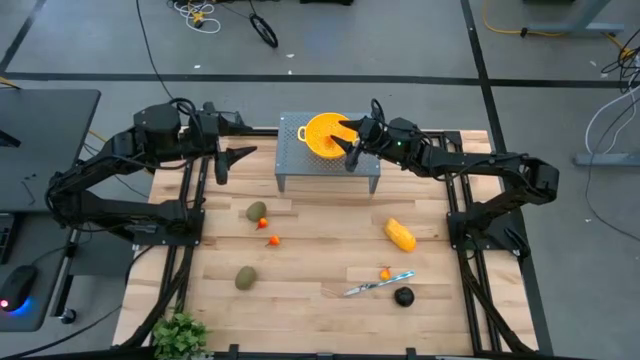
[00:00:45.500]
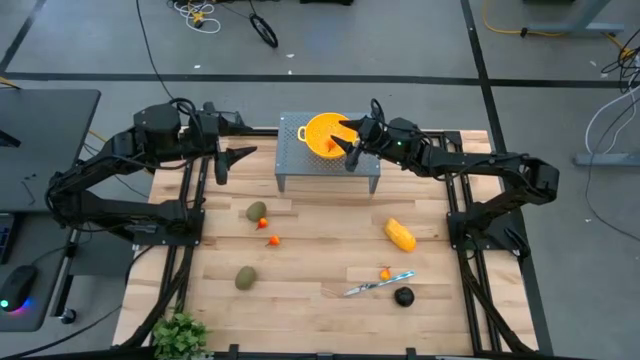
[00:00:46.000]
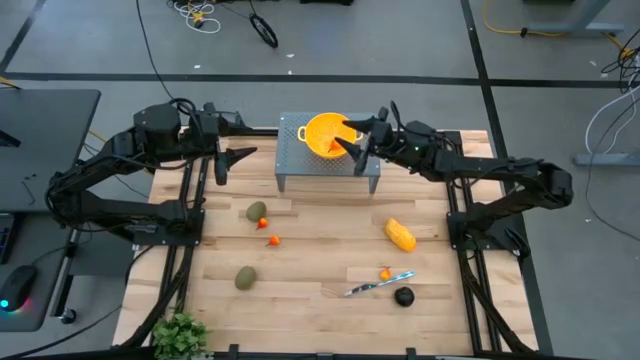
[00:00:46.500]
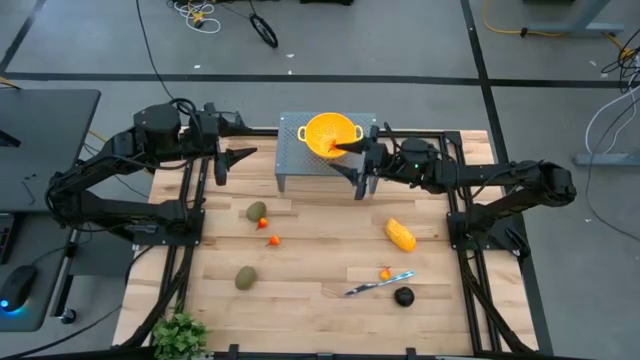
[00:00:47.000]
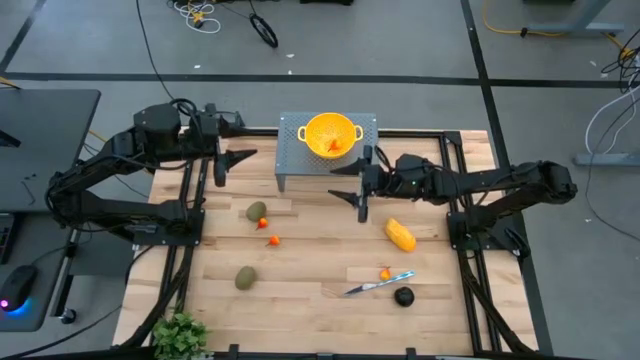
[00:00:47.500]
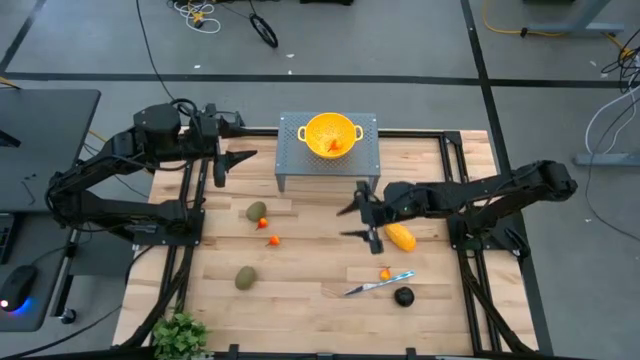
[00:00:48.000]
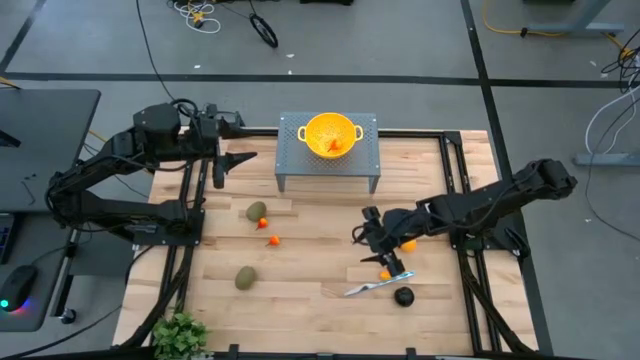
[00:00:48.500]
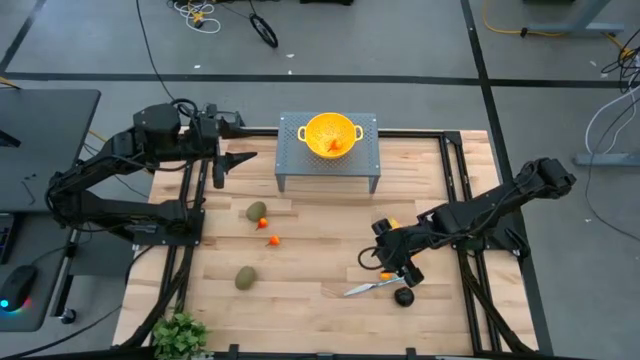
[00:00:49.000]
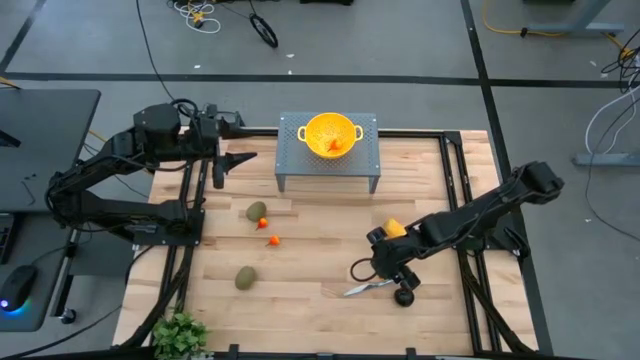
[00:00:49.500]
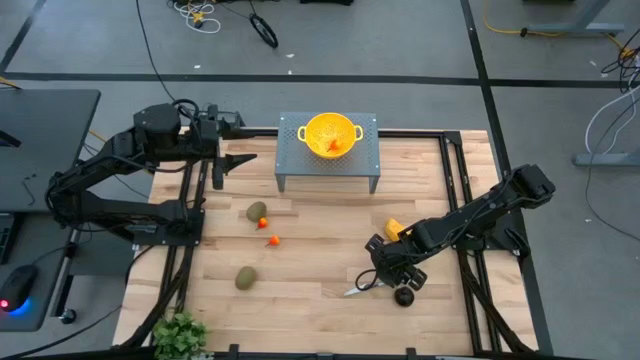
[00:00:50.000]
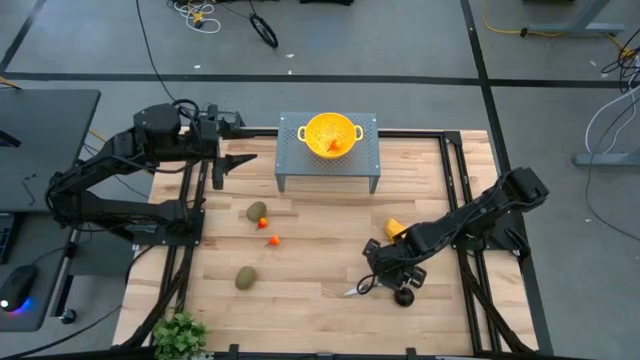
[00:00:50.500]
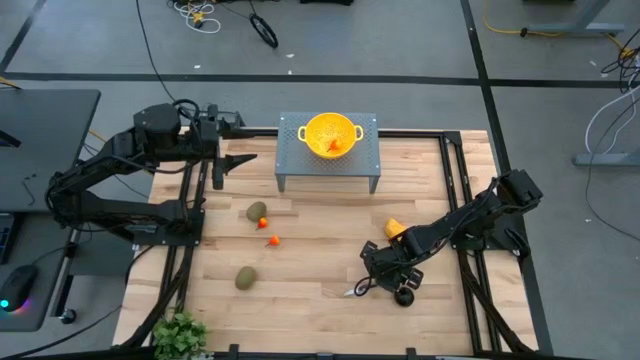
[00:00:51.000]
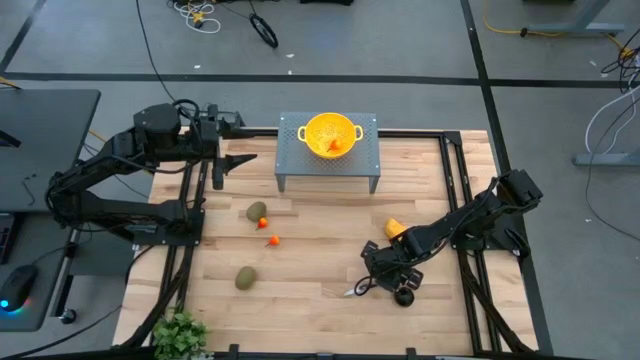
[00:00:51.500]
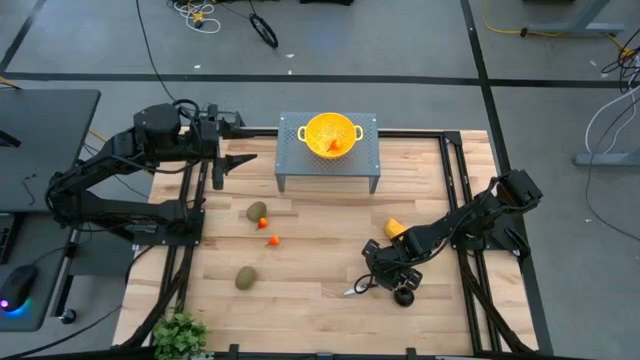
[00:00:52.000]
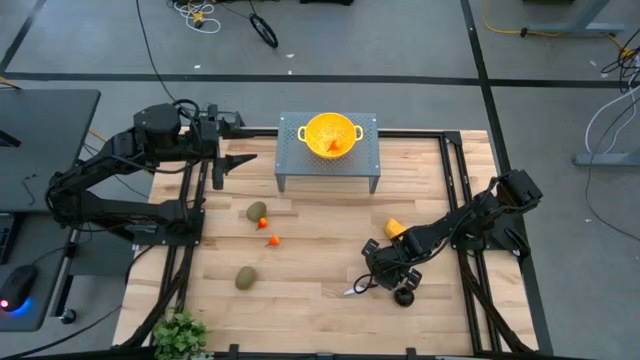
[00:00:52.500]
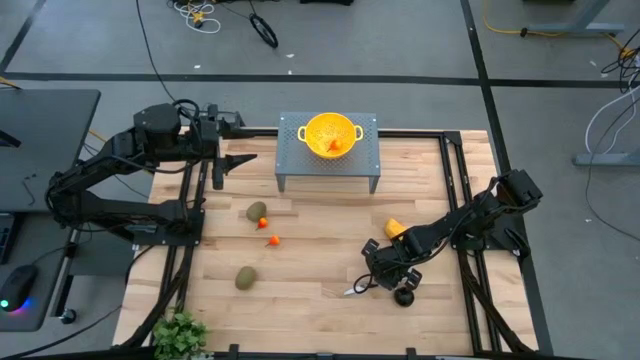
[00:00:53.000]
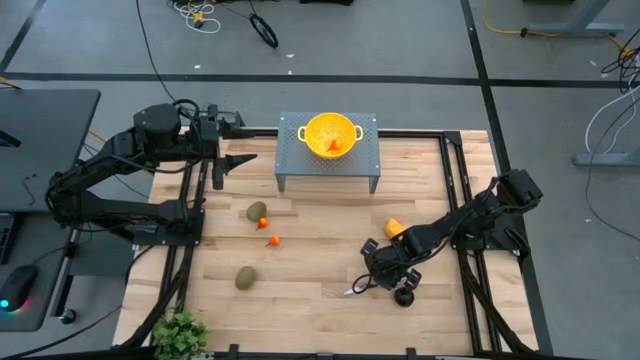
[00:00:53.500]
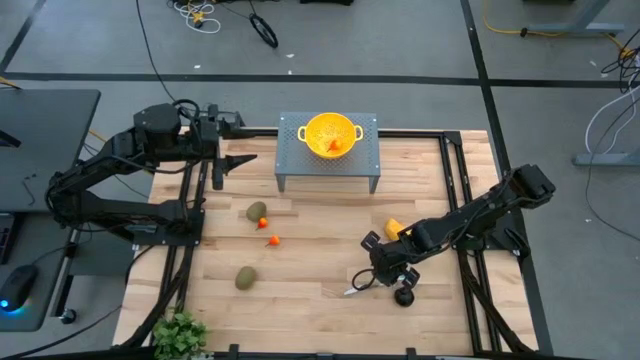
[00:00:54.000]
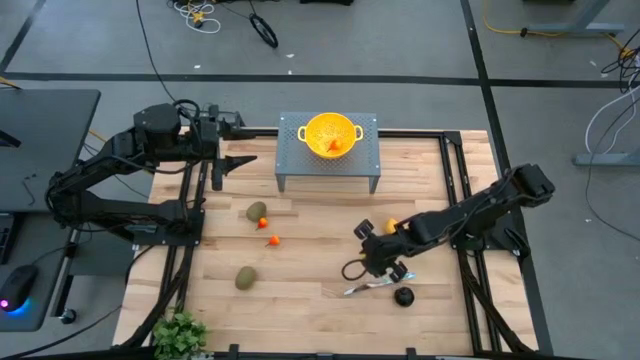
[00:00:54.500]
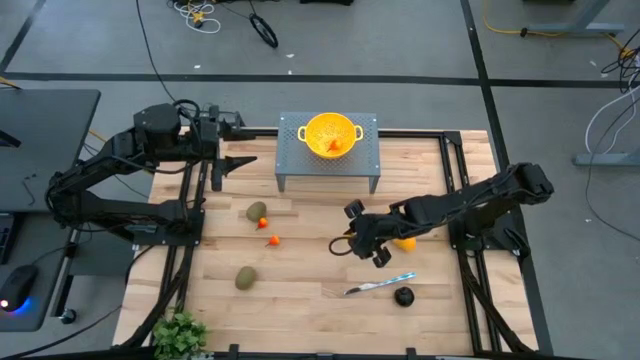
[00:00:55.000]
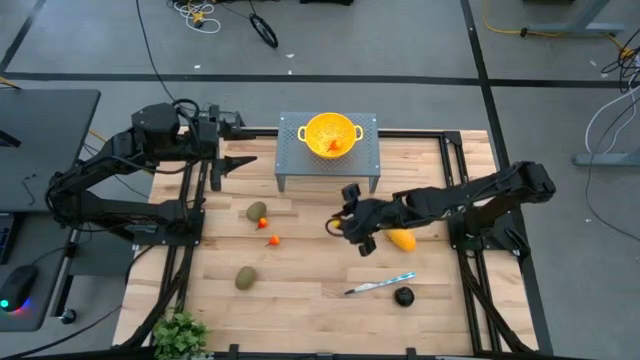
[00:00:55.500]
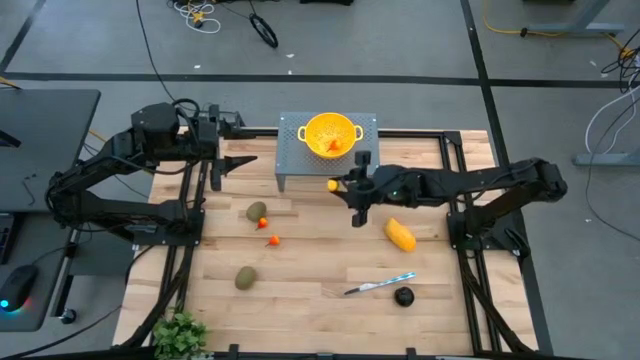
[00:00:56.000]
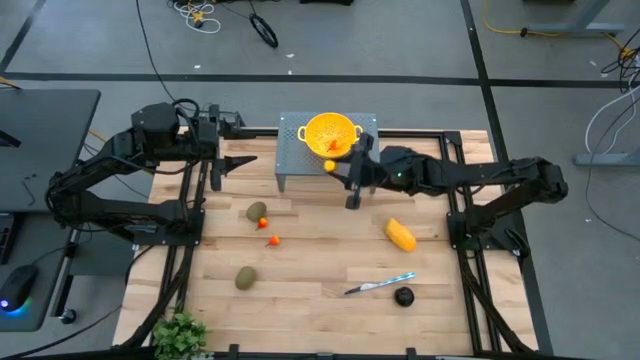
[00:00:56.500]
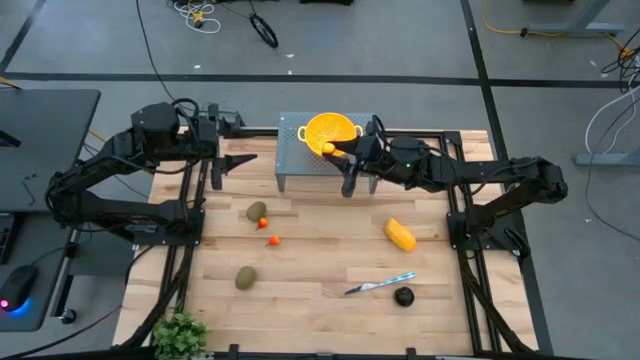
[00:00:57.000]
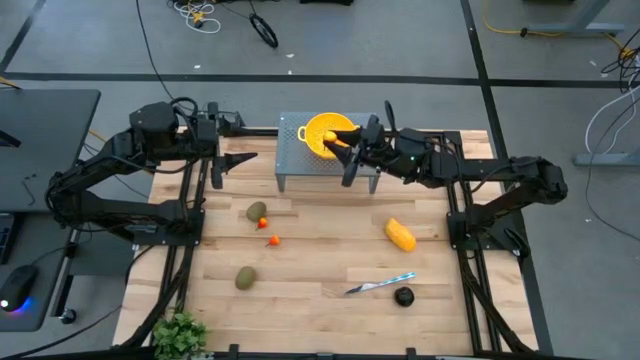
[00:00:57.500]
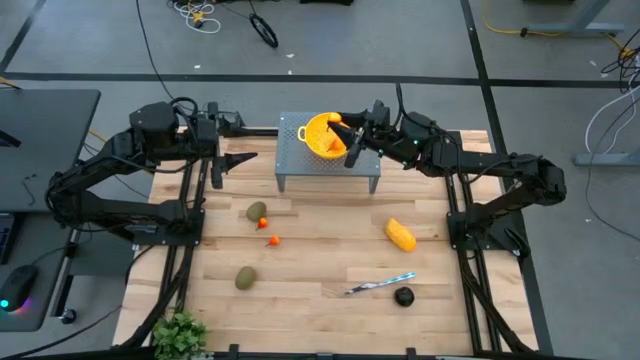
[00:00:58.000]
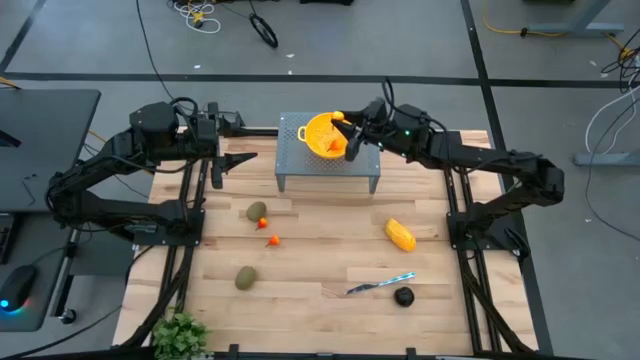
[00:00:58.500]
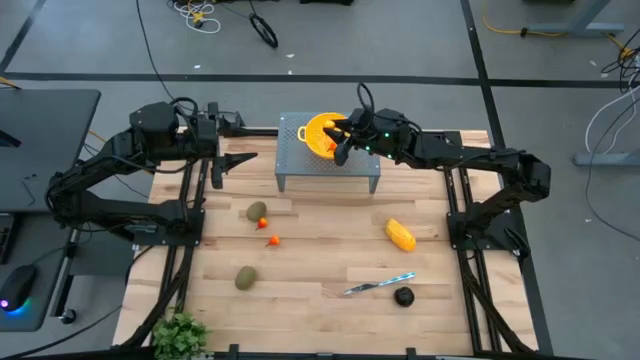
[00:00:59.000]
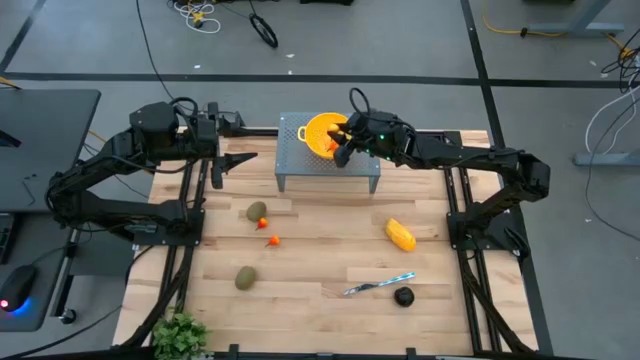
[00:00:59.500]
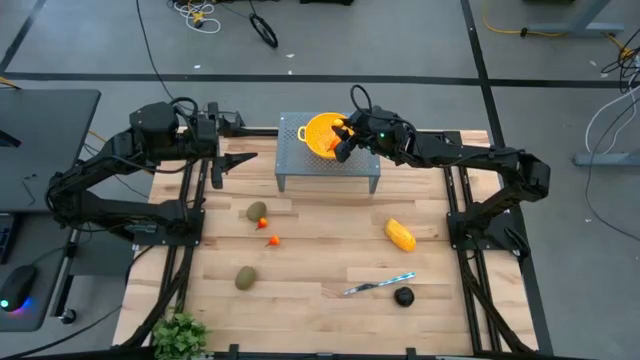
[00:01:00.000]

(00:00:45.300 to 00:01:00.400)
Task: Pick & Place Fruit
Put the yellow pear into the yellow strainer bowl on the shelf

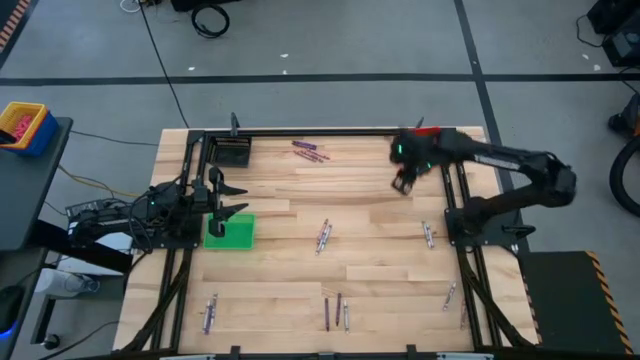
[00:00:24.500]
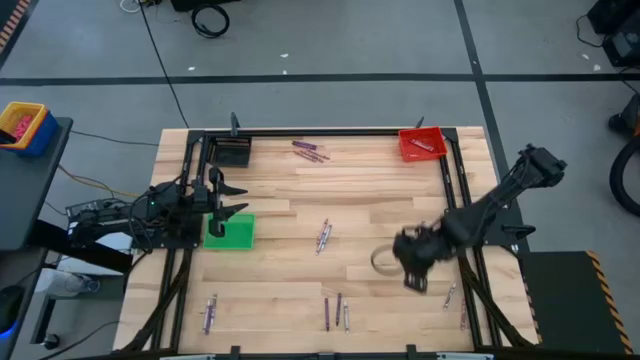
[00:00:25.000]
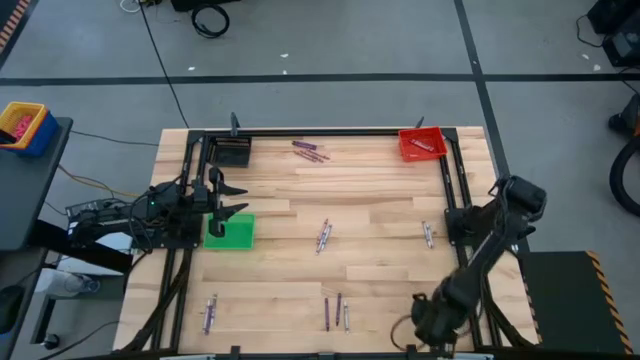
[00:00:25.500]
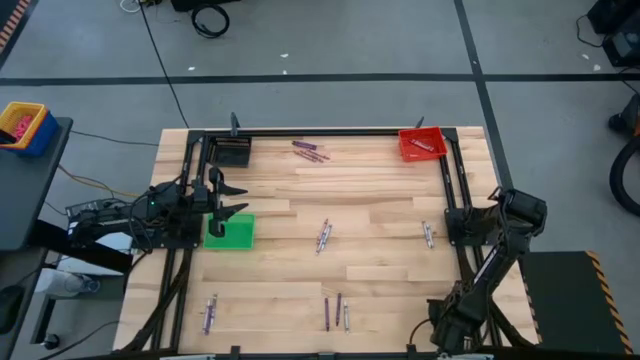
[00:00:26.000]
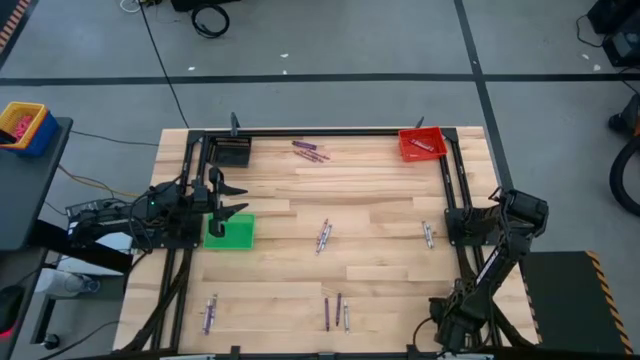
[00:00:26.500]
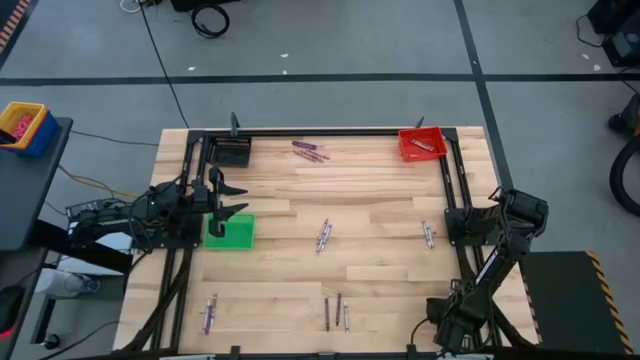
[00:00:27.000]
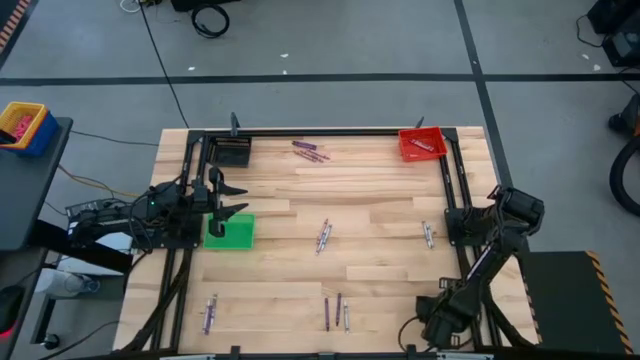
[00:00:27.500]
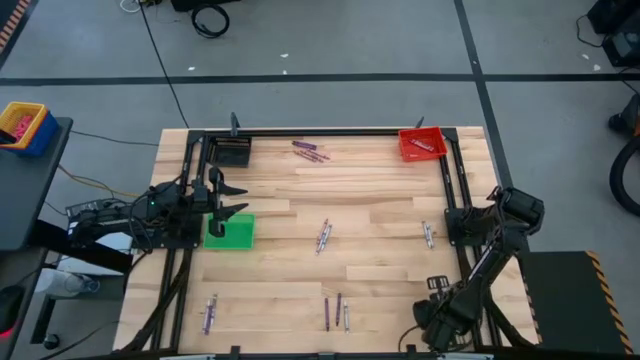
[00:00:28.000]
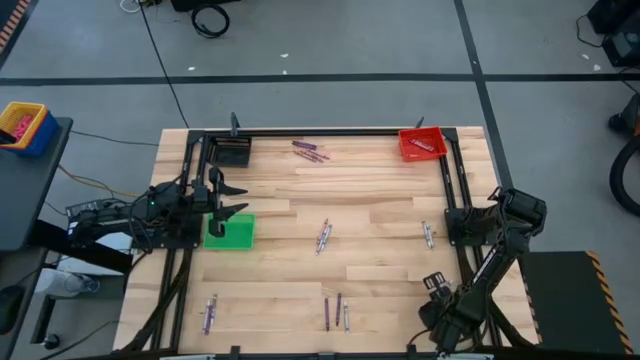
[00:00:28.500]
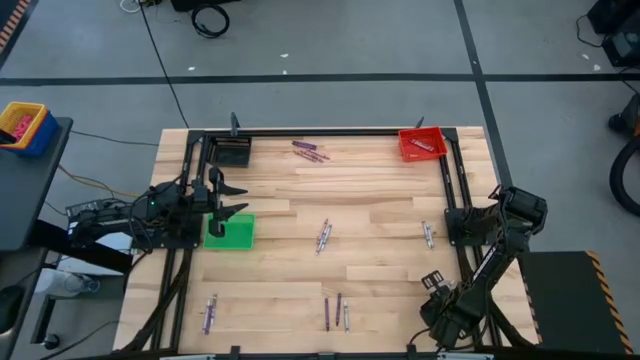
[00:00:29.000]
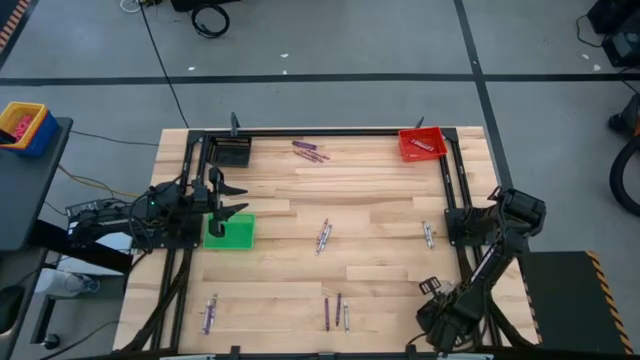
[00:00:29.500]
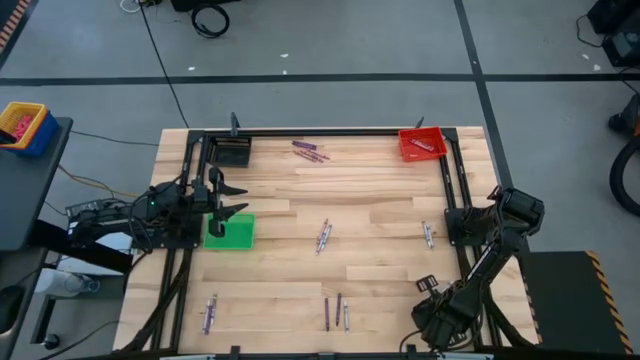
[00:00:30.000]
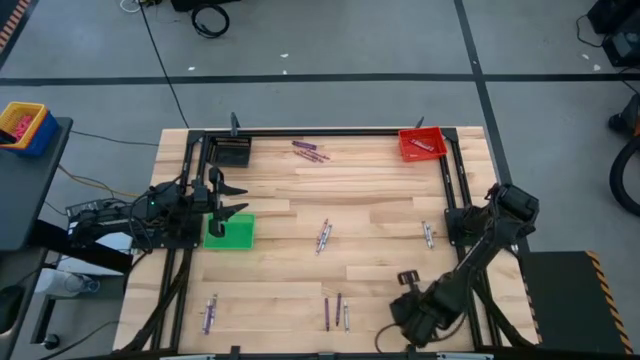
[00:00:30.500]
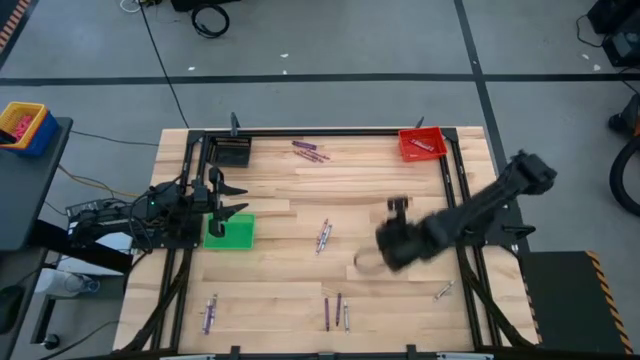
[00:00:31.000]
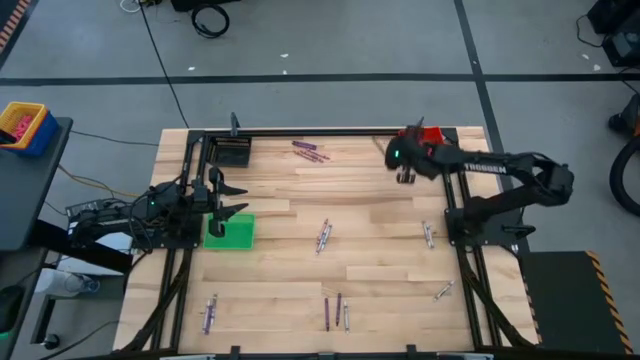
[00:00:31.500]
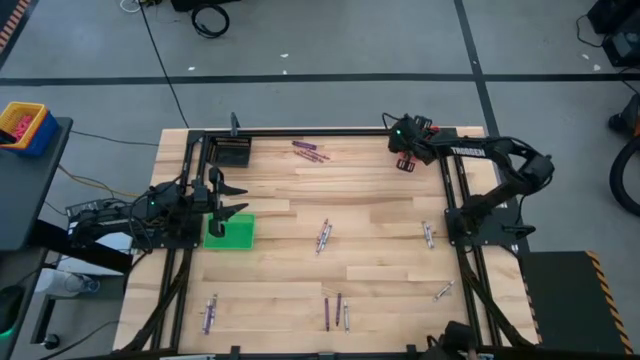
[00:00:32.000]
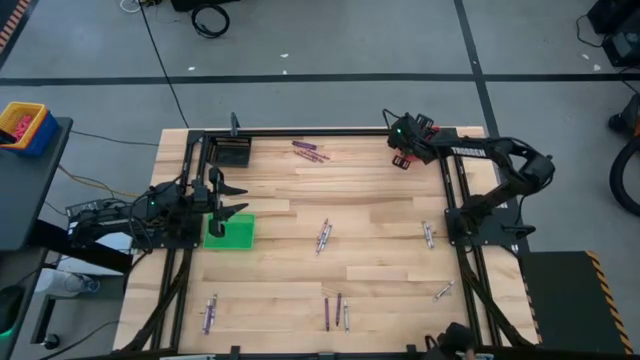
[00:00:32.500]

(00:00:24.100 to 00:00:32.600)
Task: Sort crayons
Put the pink crayon into the red bin
